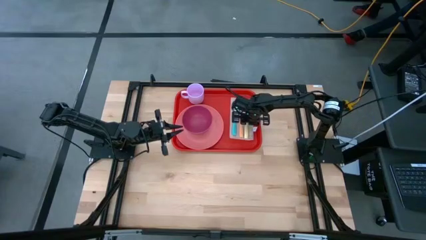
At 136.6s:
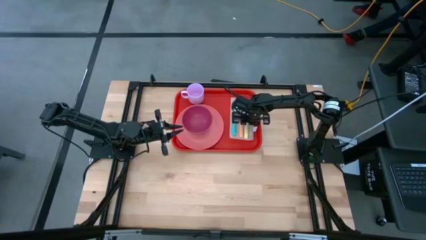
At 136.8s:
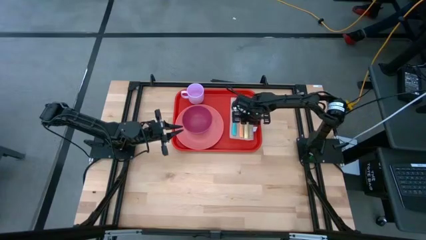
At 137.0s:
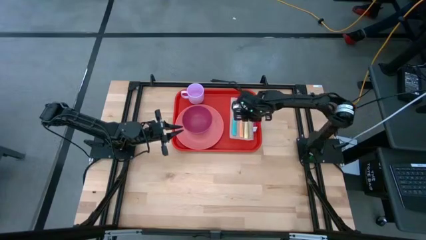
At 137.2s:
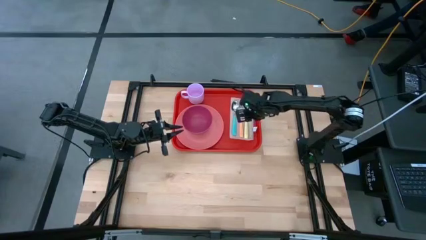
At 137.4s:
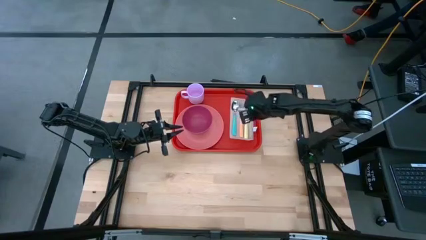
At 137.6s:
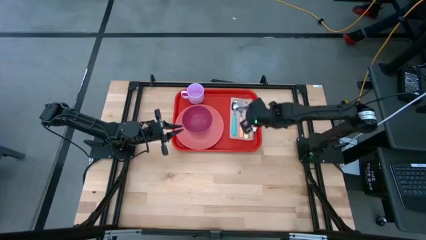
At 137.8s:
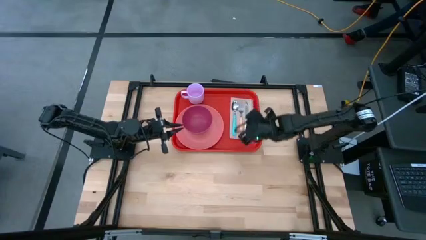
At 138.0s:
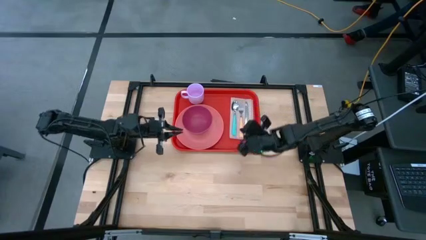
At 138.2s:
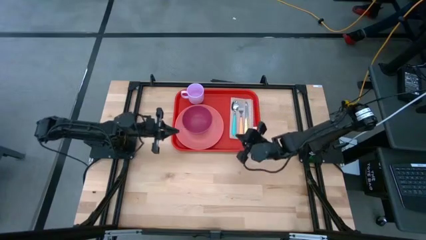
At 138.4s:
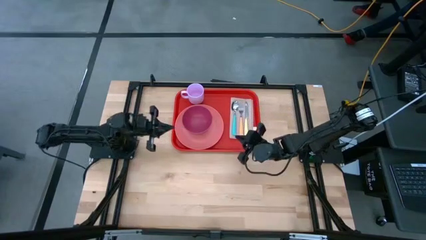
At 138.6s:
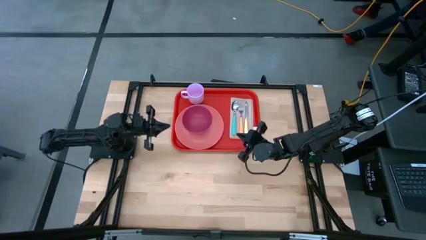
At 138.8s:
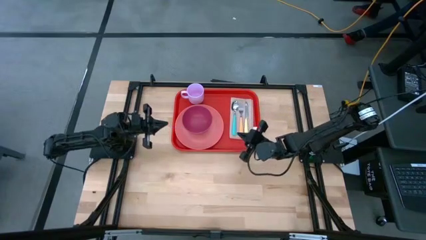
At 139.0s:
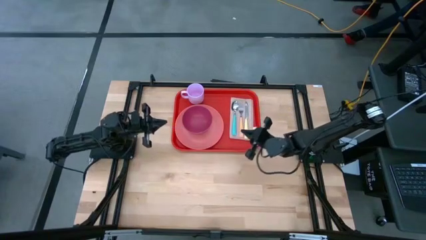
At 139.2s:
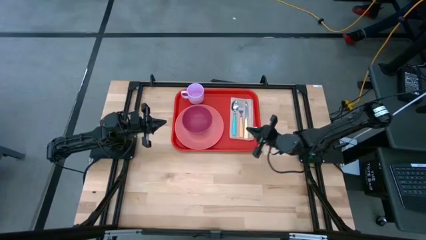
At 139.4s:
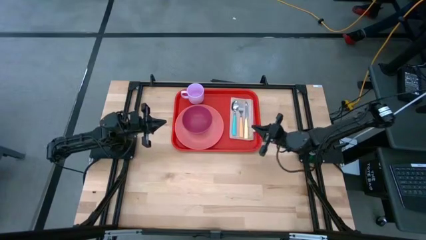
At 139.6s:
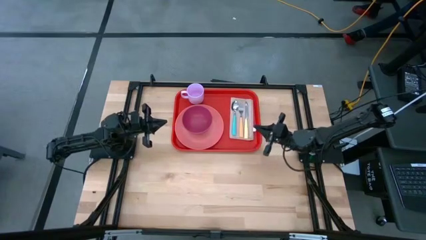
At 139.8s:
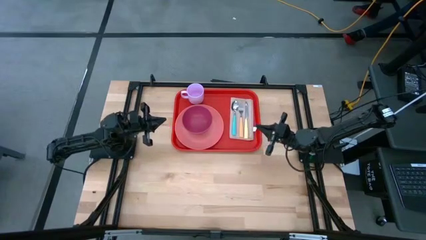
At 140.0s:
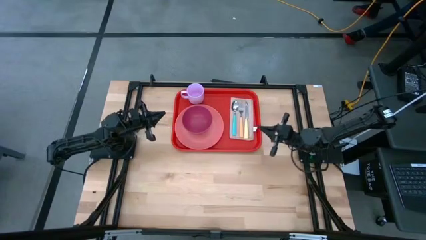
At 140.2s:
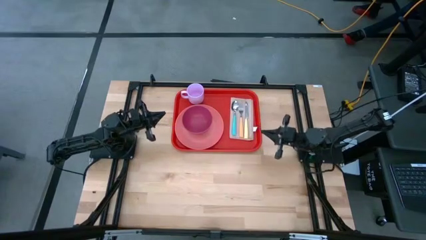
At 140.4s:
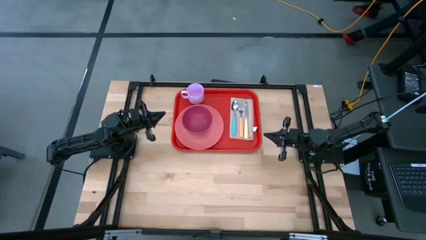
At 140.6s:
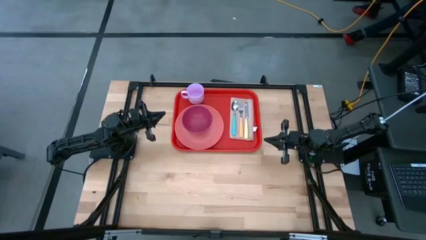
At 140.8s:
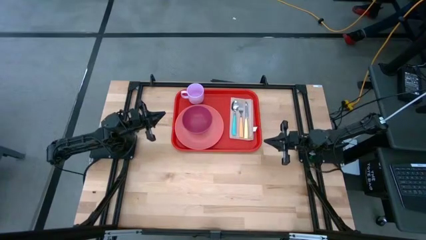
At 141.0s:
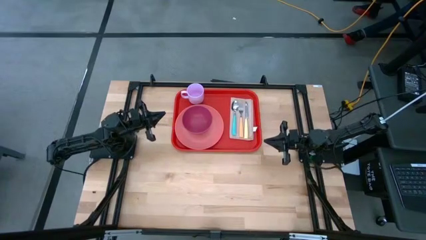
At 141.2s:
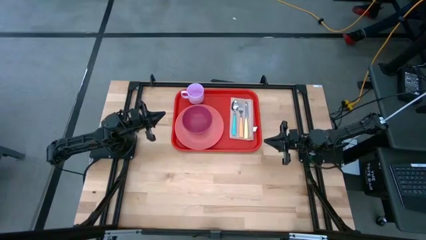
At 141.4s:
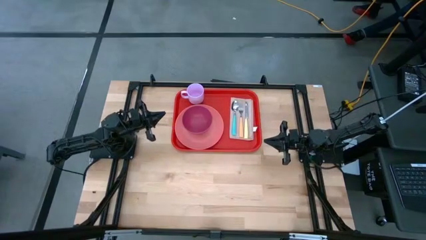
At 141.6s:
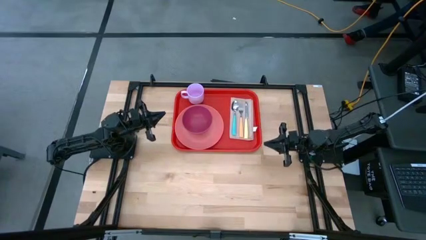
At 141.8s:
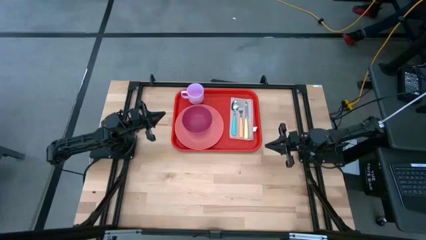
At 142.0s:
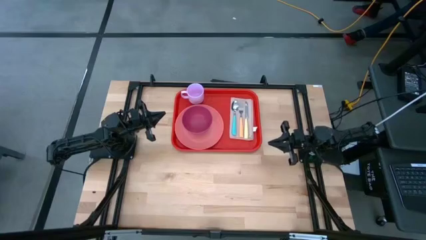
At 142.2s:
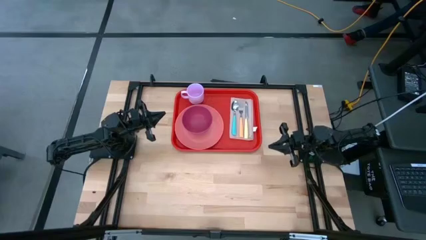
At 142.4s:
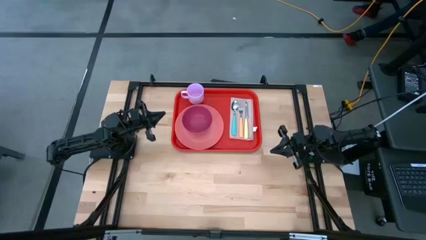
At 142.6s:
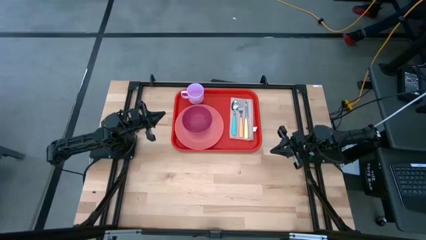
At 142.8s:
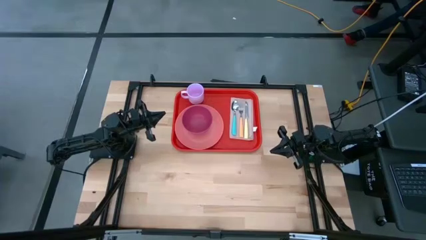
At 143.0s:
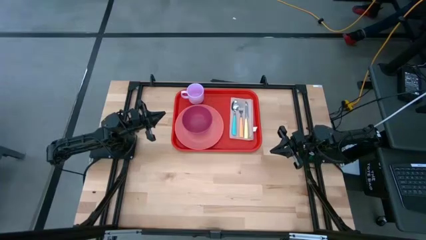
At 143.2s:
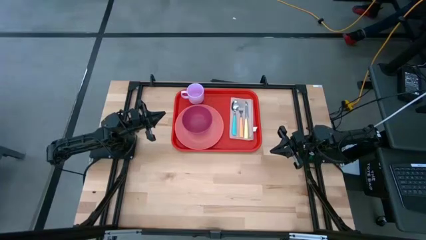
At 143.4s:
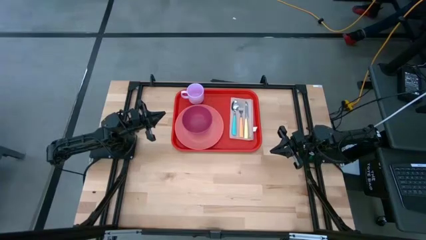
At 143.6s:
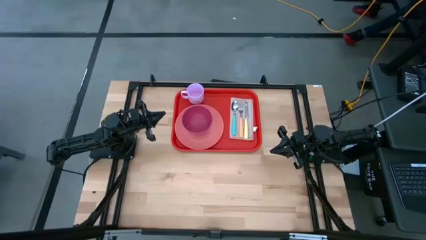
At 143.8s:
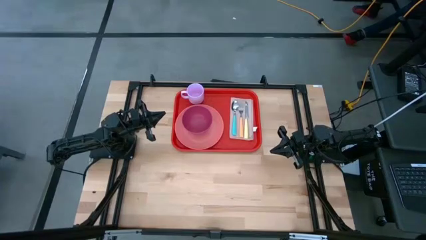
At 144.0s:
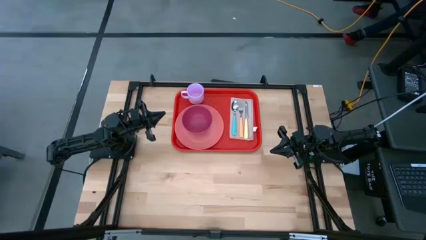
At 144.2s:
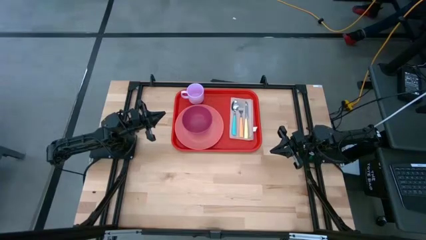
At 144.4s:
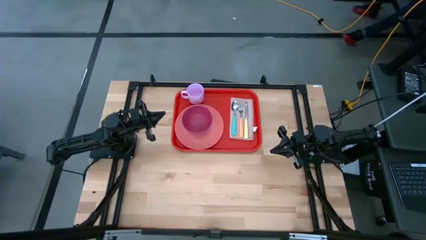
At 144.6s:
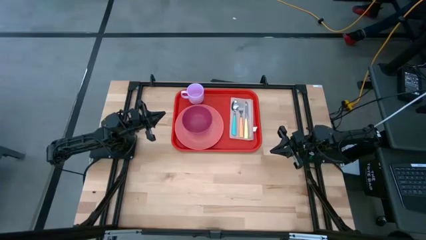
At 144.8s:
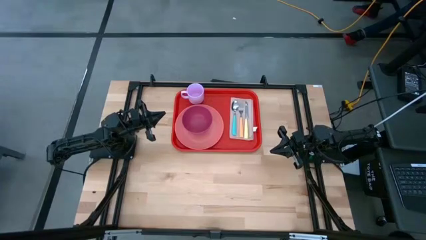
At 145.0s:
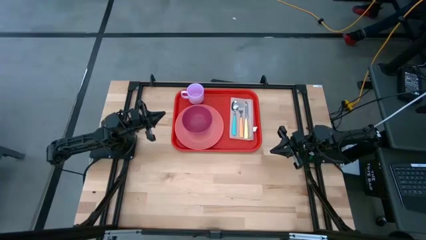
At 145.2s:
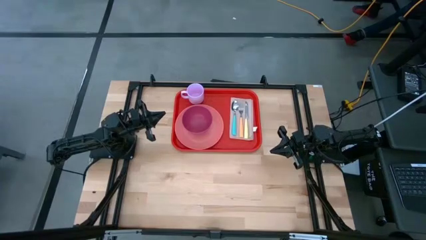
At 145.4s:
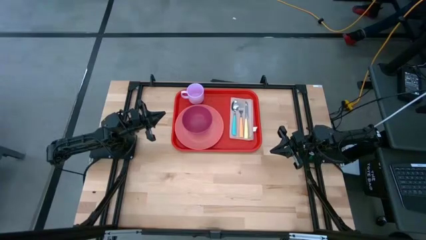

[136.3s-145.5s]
Task: Set up tray
Return to Home Position

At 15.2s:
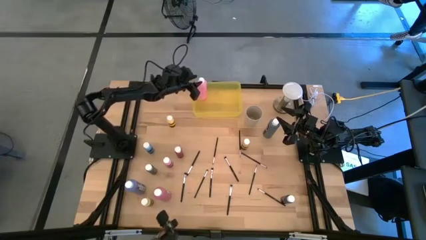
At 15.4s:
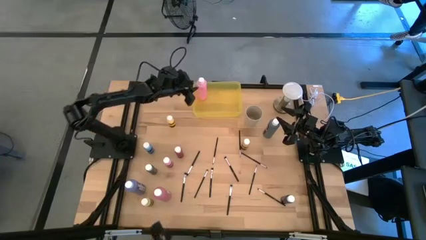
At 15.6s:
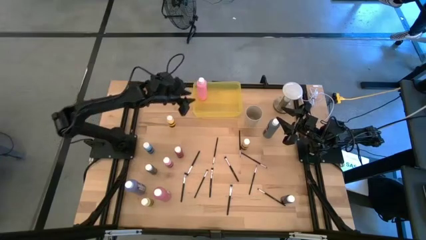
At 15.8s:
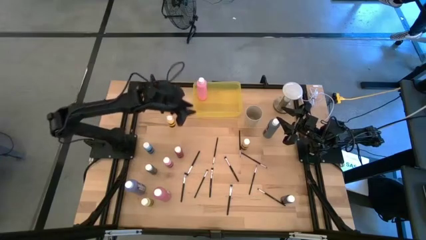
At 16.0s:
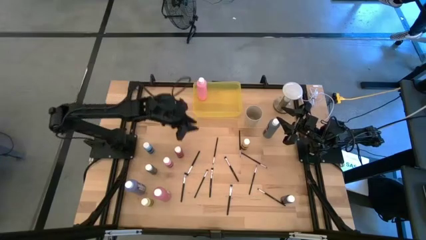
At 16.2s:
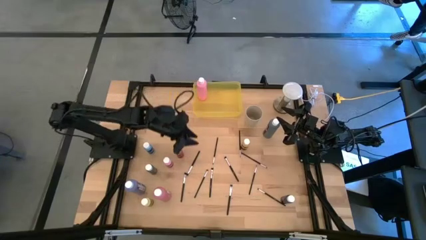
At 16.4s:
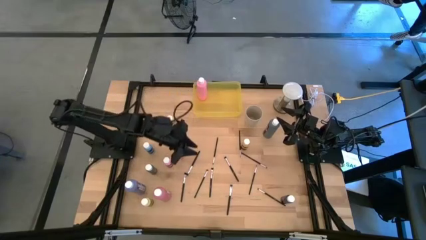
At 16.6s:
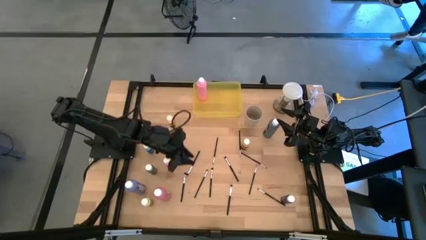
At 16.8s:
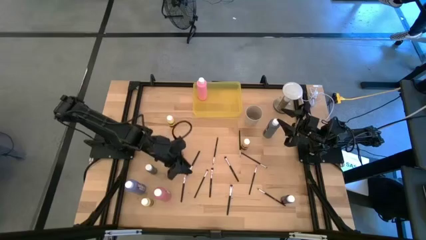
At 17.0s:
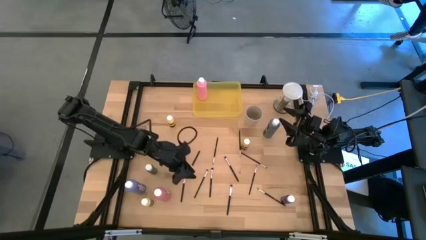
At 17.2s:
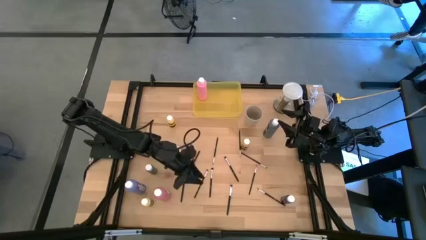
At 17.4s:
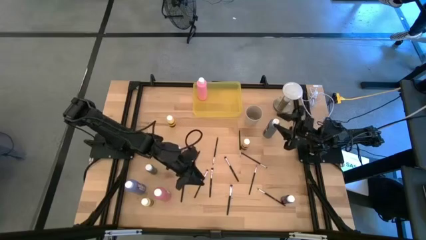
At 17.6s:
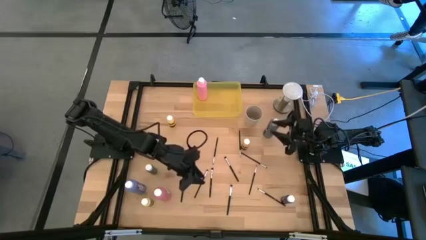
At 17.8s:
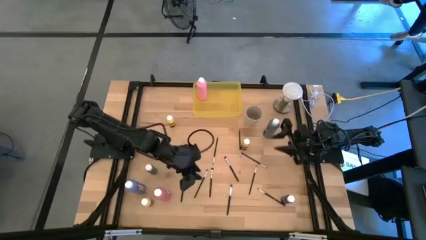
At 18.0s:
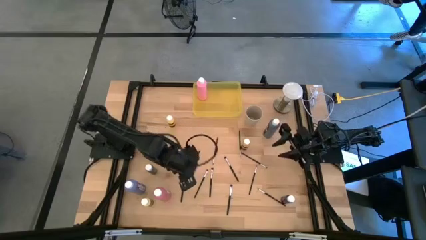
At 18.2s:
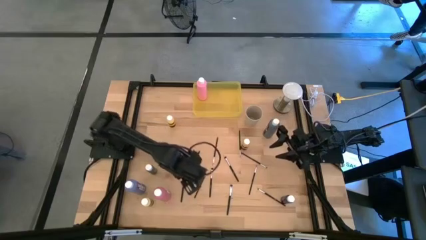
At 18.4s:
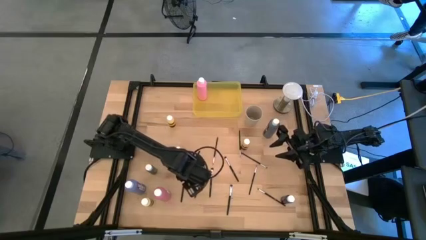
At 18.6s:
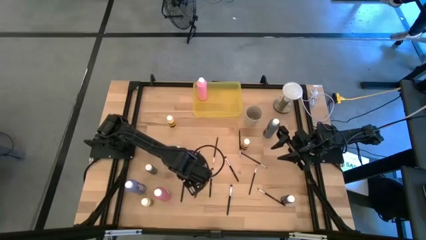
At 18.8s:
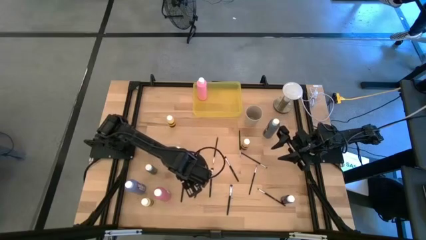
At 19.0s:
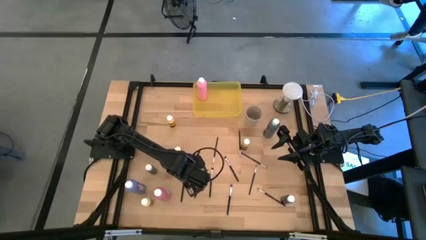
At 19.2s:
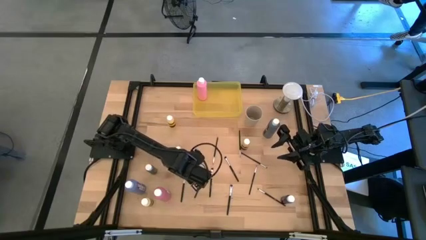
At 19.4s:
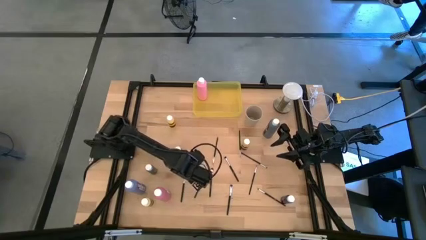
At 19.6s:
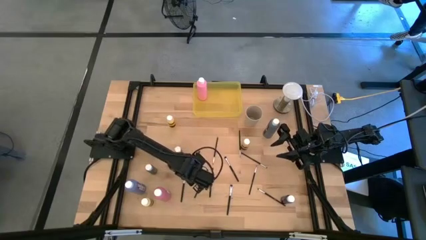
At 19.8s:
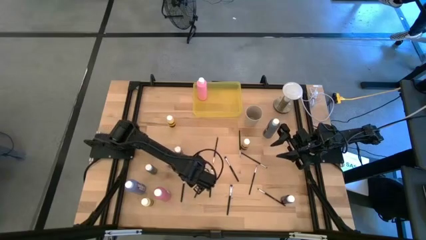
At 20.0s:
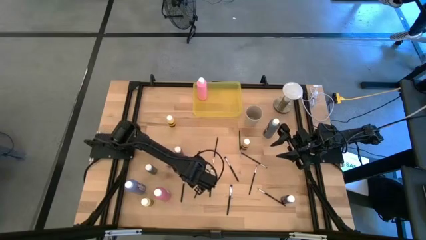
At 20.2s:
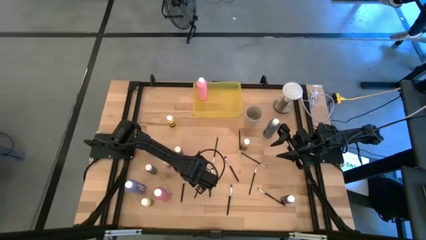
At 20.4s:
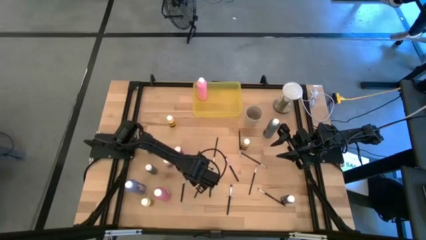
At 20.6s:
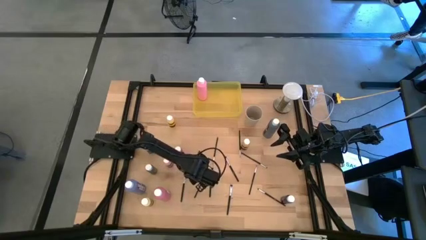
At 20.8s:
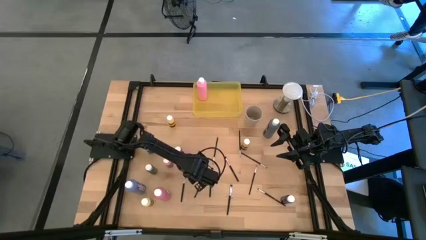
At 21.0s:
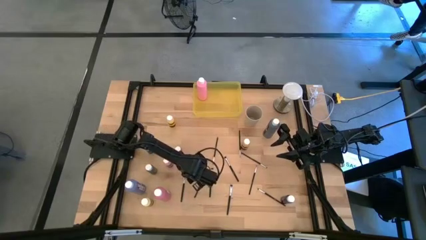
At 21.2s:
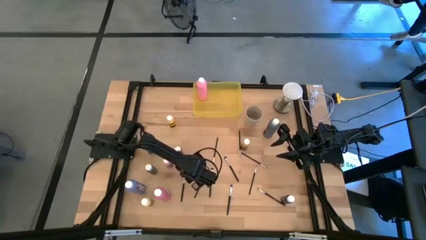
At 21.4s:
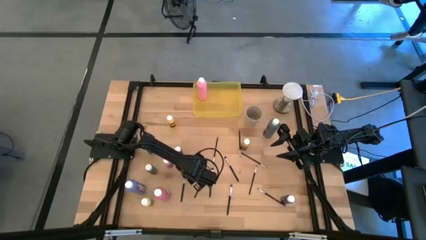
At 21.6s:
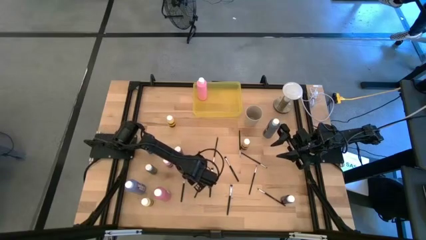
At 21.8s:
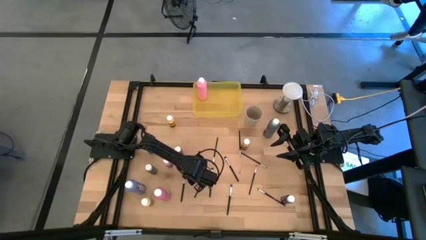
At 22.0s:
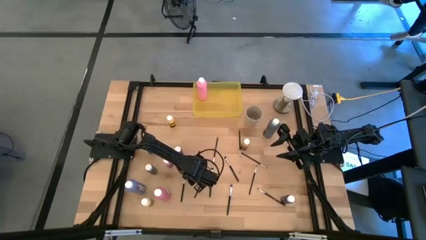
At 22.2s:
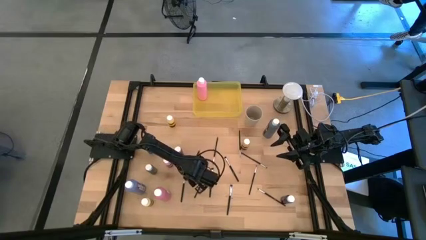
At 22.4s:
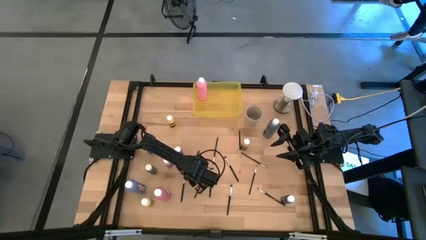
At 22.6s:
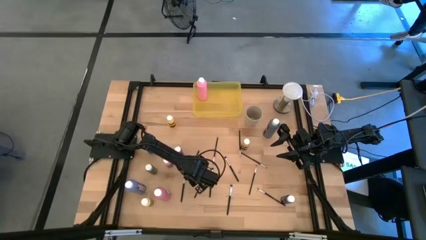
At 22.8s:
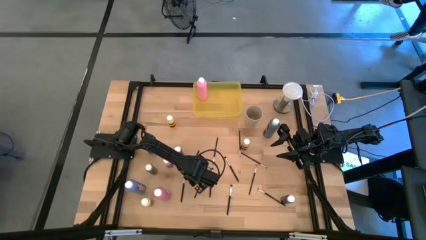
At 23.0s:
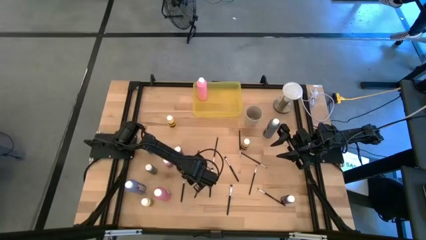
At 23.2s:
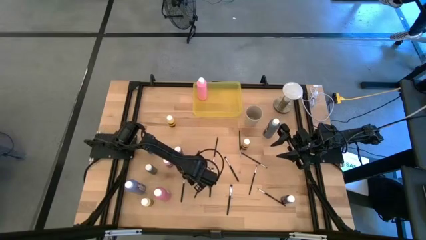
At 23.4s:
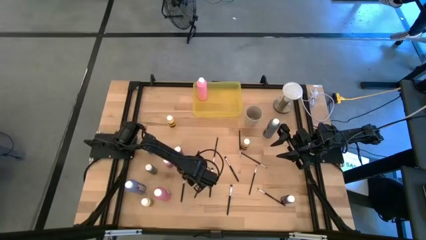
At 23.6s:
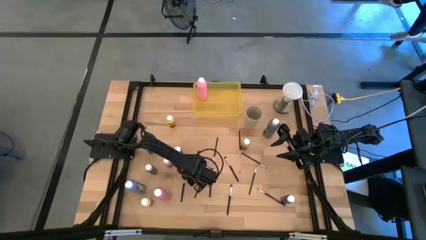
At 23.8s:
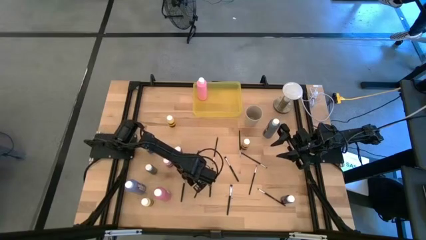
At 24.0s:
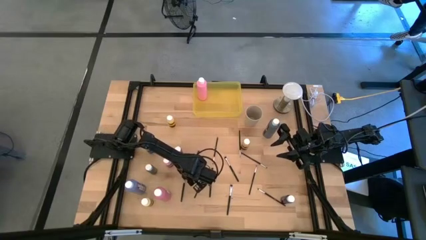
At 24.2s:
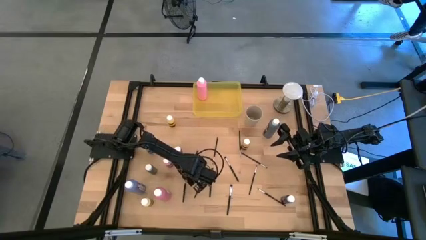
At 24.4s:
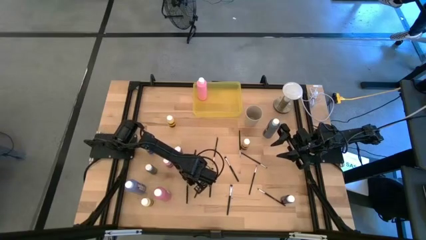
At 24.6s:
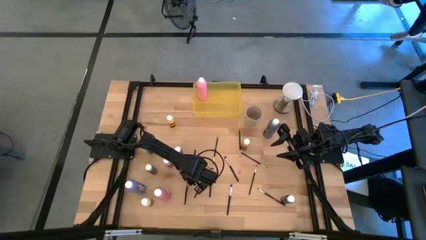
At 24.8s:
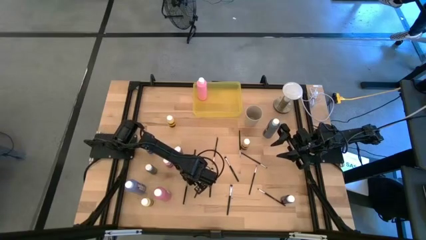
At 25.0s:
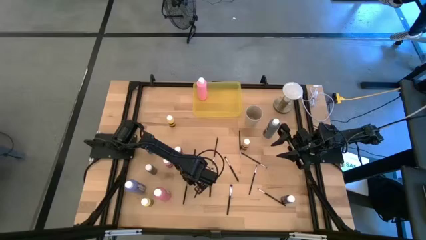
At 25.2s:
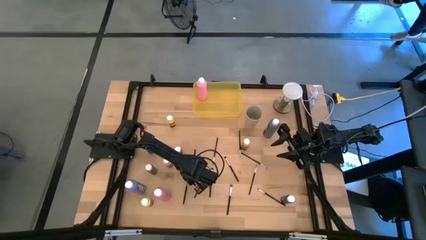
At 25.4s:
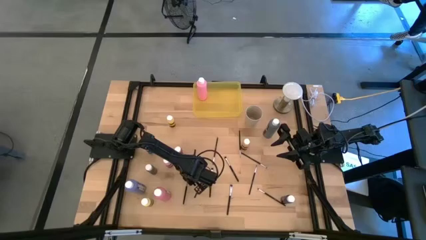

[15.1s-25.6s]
Task: Pick & Place Paint Supplies
Put the silver paint brush into the white cup
